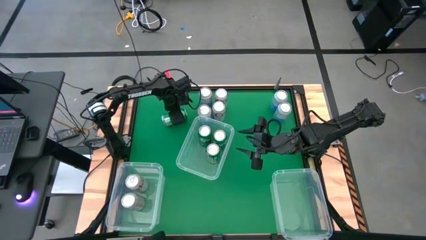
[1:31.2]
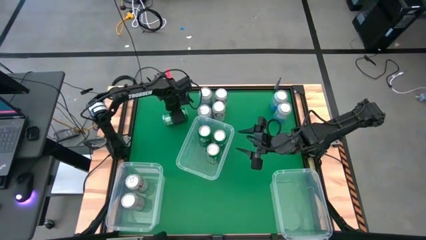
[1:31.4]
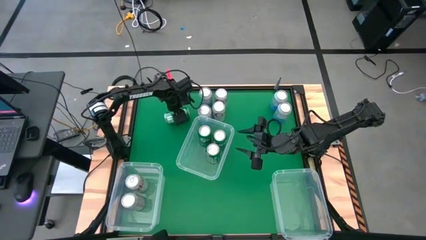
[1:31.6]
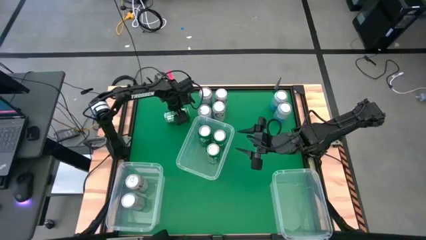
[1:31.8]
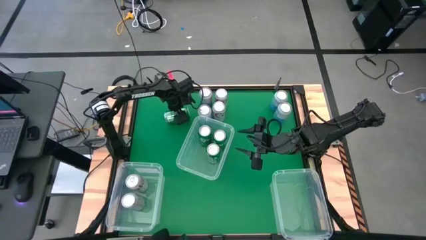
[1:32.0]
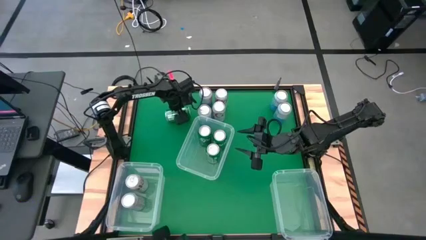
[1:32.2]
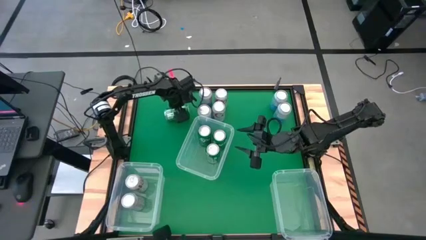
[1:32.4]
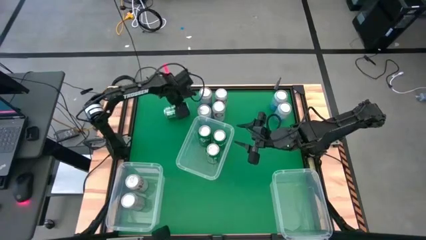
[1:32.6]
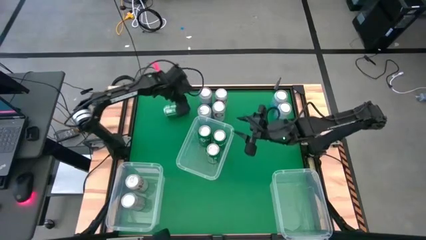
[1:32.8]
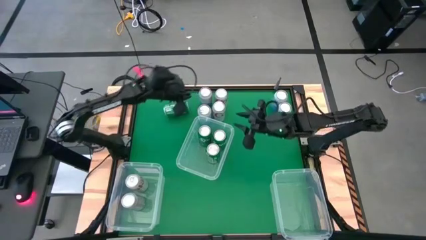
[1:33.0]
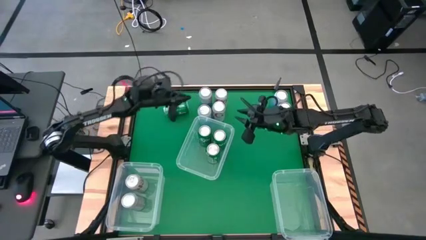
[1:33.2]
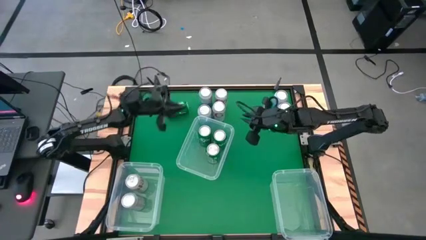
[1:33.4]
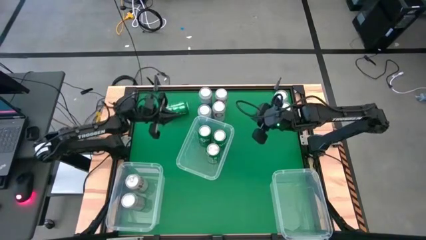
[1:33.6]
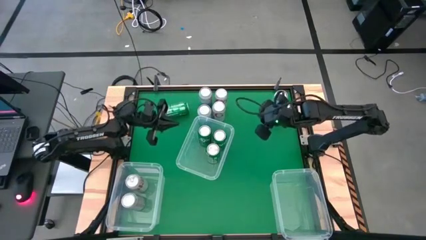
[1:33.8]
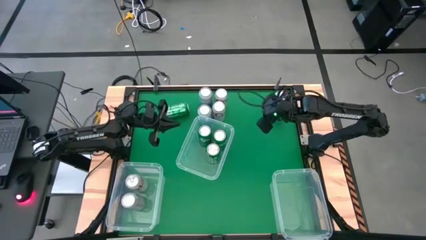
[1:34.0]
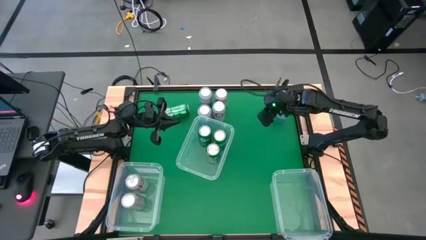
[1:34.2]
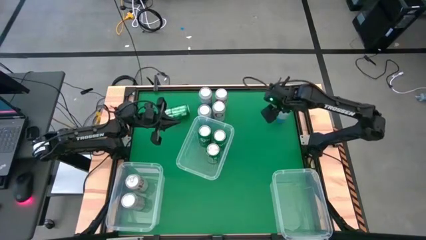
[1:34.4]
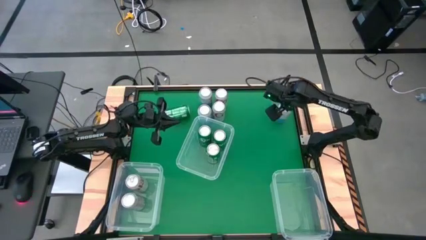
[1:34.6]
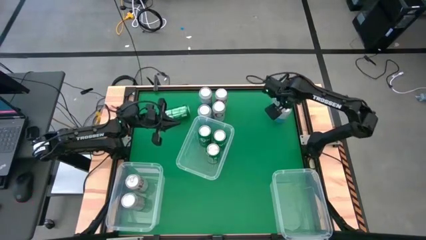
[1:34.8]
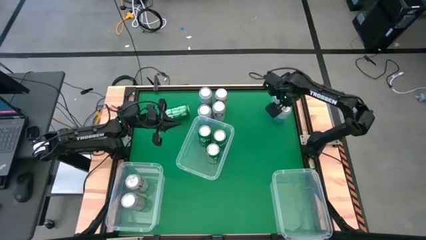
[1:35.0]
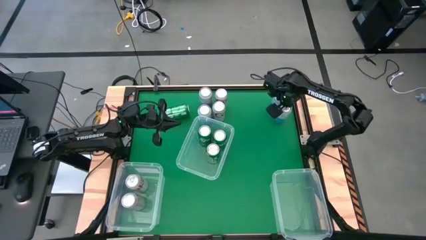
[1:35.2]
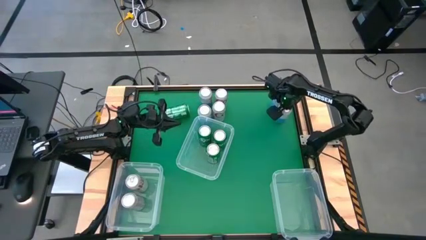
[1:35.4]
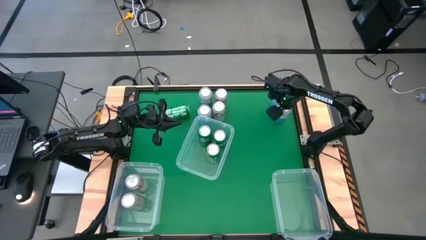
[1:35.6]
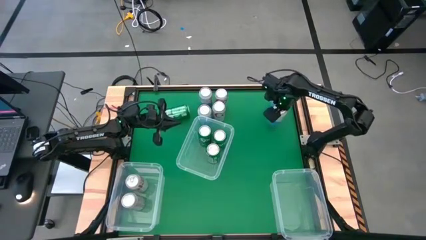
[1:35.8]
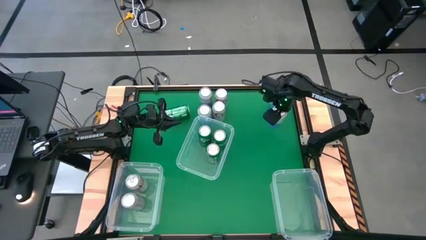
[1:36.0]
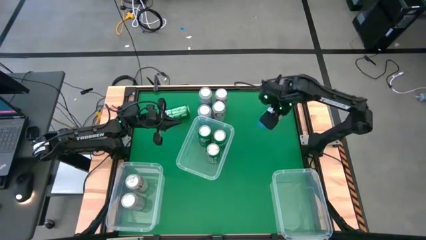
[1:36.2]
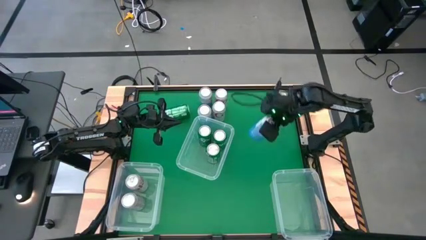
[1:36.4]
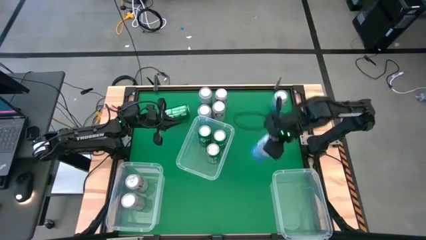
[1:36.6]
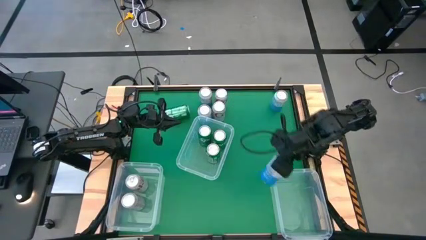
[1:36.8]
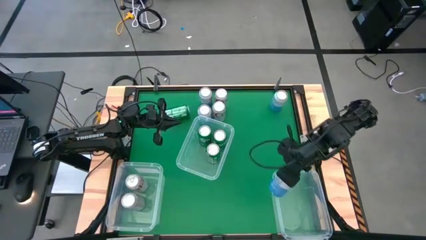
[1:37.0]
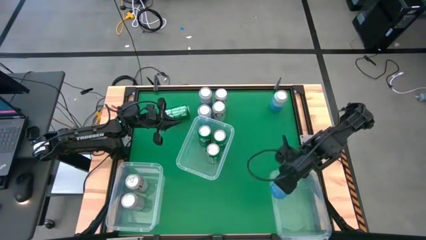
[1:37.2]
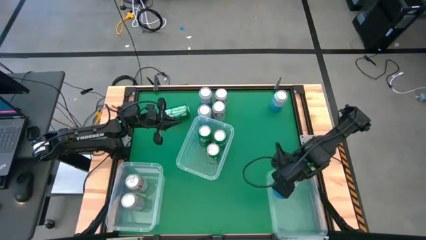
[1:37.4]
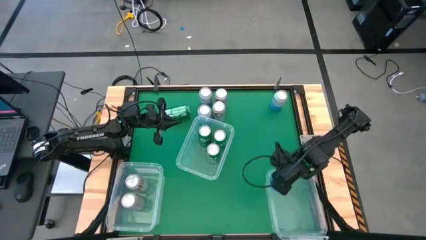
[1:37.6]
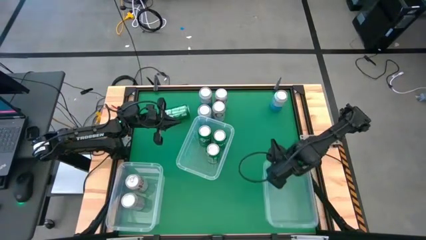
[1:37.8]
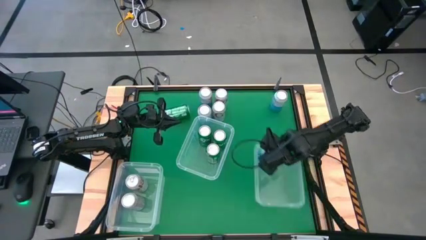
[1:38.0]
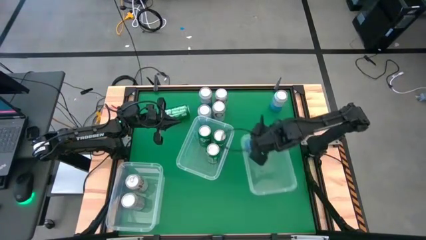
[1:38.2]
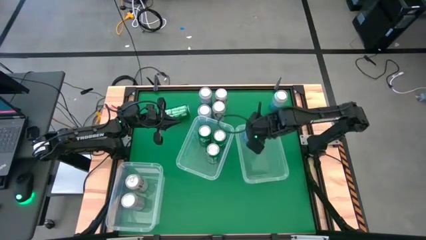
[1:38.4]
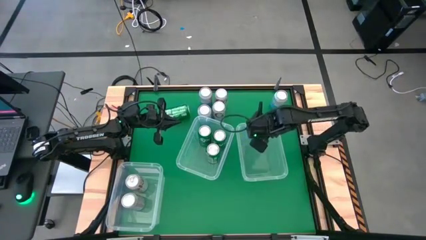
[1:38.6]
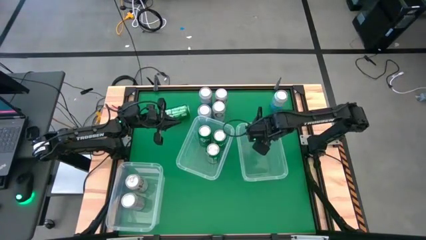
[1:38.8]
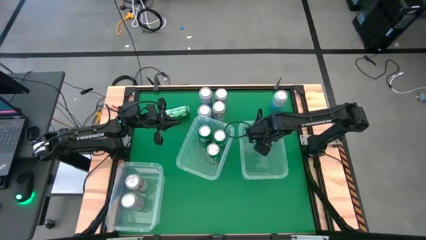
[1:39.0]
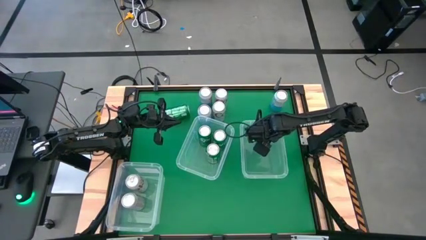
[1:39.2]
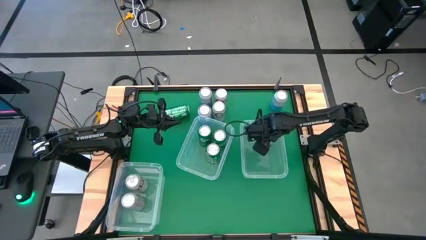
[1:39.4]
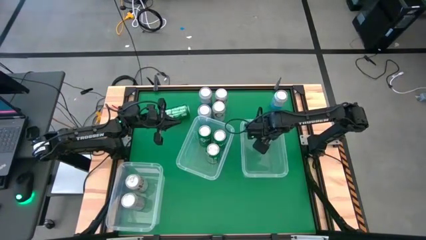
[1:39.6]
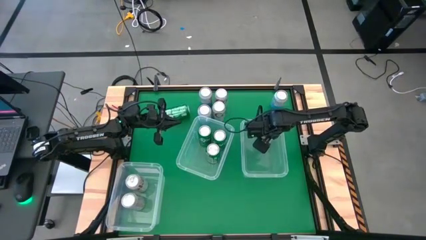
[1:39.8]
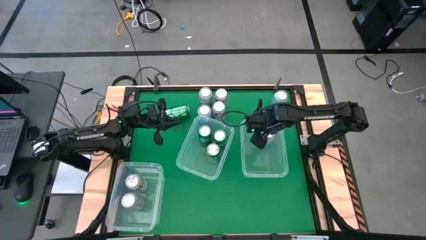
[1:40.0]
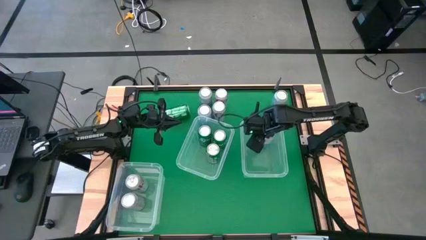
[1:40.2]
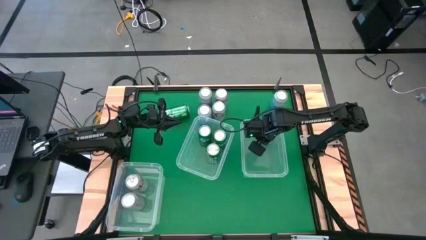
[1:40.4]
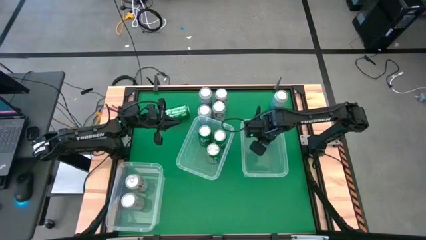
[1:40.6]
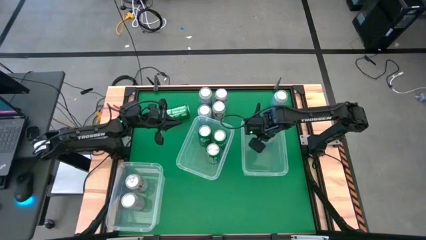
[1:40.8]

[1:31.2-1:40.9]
Task: Sort soda cans
Put the blue soda can into the bottom right transparent bin

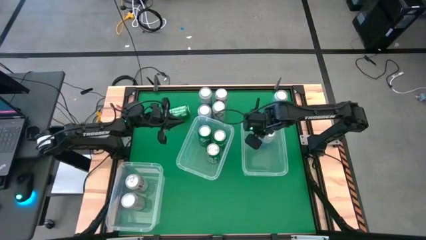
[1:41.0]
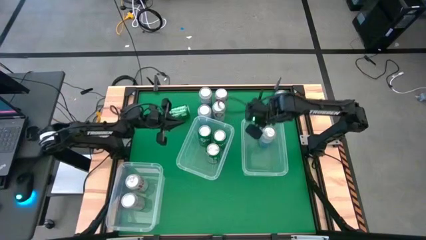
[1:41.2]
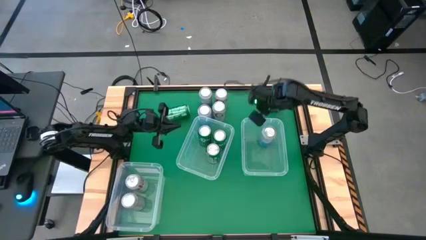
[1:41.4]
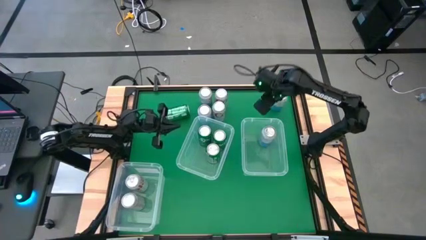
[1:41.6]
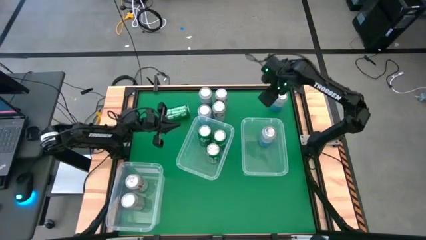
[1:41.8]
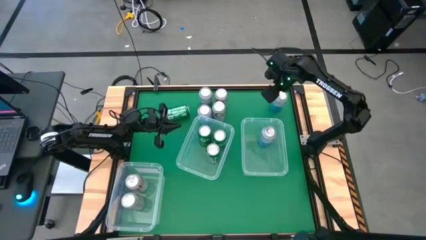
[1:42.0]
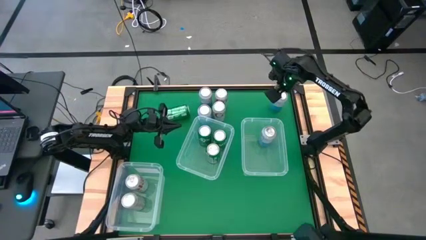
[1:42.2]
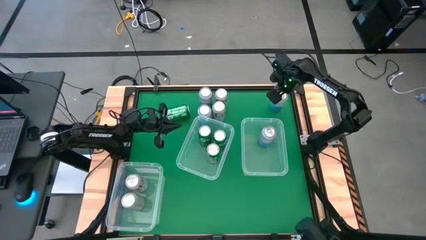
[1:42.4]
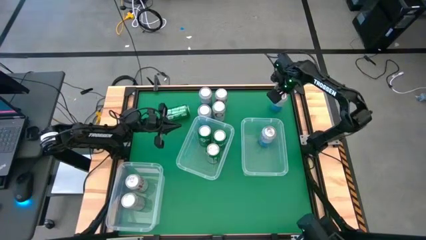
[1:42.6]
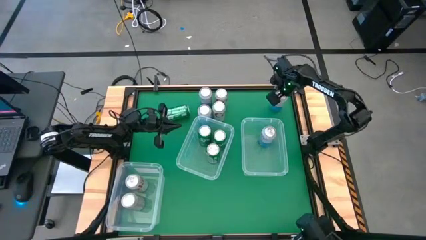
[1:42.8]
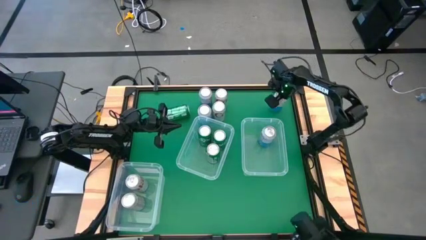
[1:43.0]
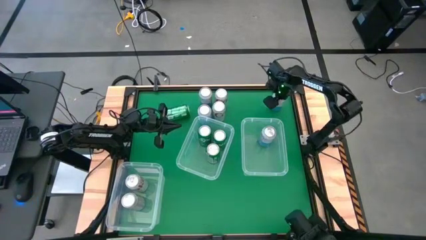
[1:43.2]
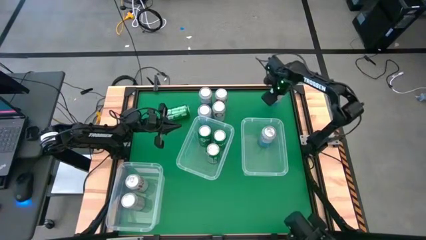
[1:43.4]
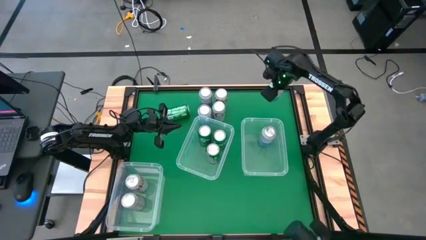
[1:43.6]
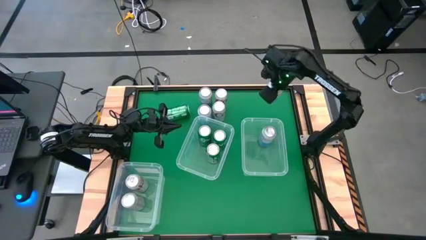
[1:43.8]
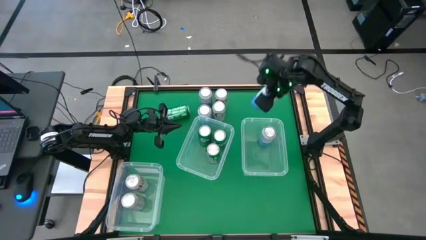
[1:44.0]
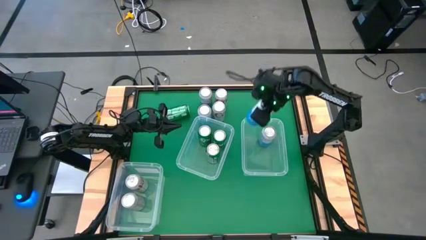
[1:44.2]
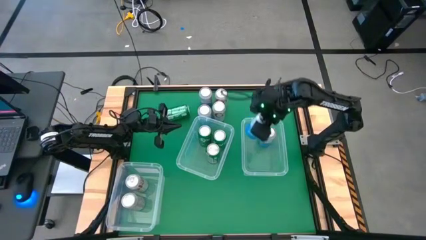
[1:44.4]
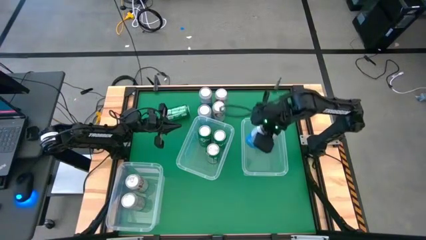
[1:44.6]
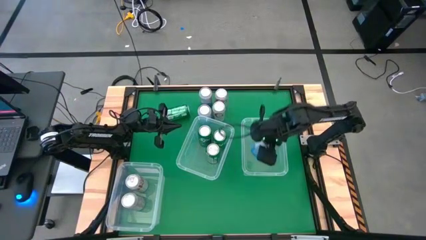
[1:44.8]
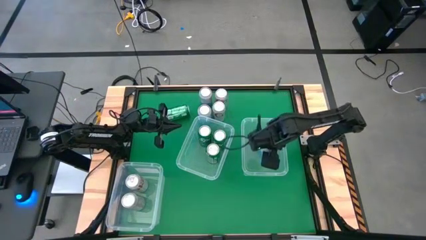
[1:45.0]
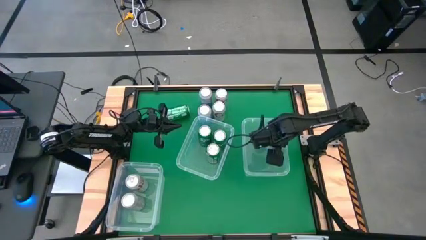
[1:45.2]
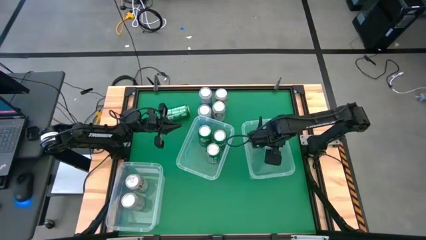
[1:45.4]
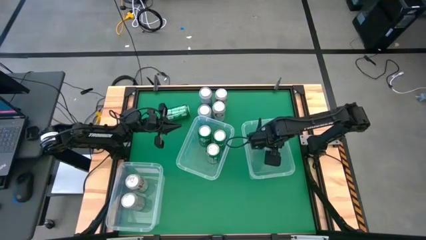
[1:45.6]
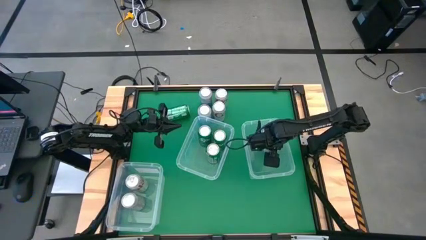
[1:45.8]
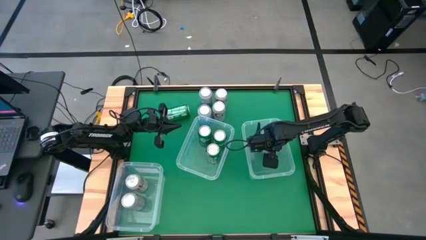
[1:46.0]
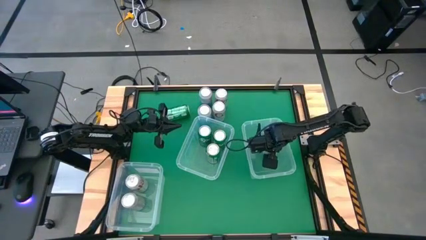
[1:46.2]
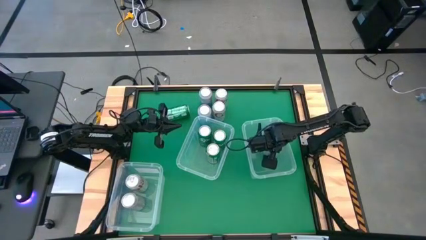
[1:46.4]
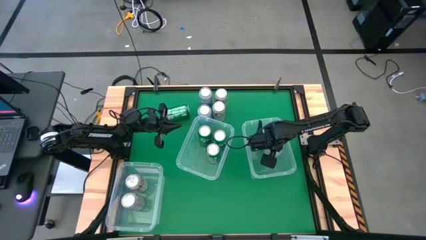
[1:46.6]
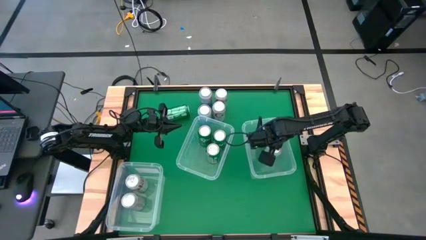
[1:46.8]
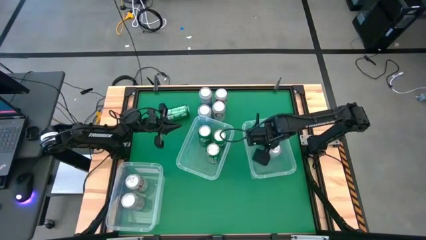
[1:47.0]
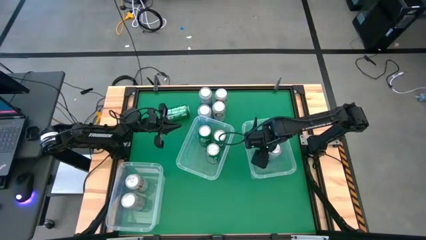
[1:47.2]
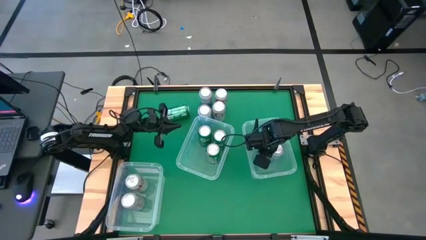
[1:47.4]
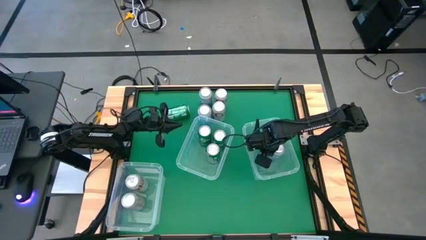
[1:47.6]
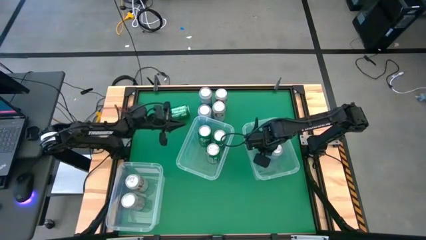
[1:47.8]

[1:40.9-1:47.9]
Put the blue soda can into the bottom right transparent bin
